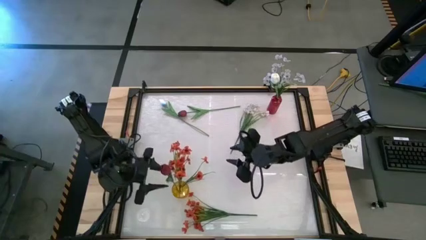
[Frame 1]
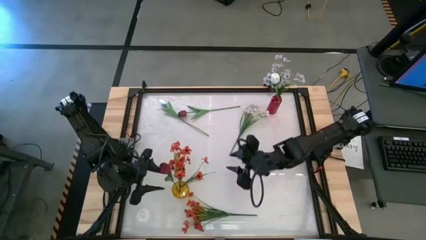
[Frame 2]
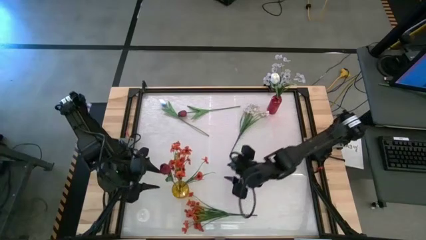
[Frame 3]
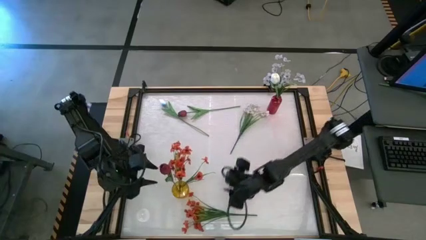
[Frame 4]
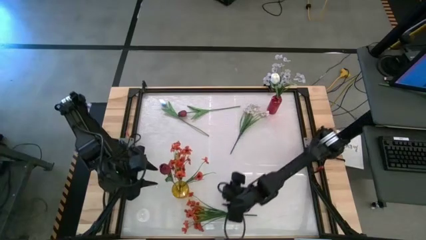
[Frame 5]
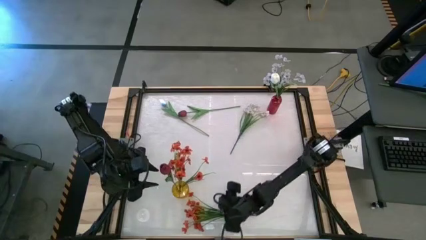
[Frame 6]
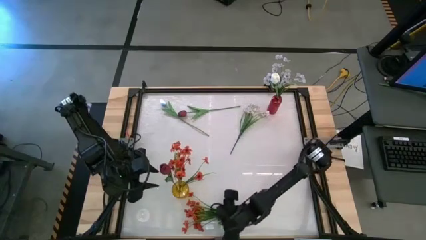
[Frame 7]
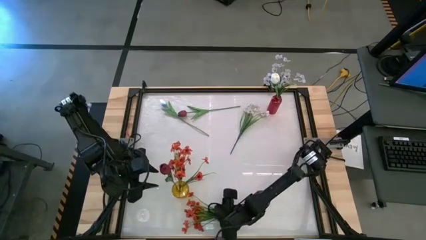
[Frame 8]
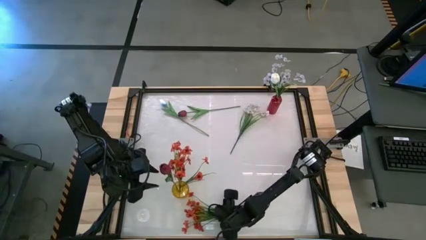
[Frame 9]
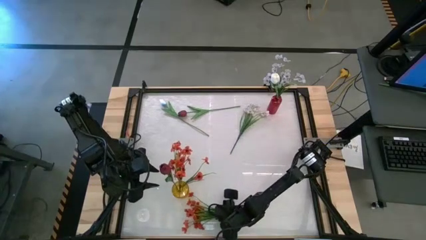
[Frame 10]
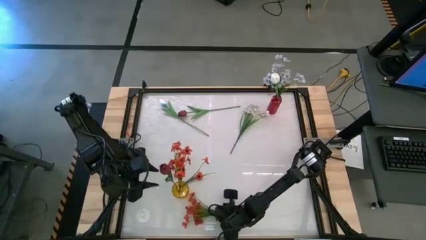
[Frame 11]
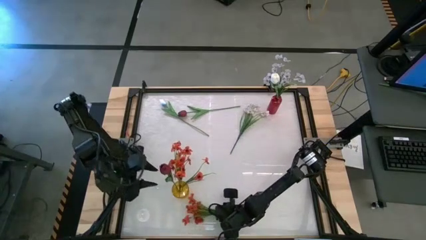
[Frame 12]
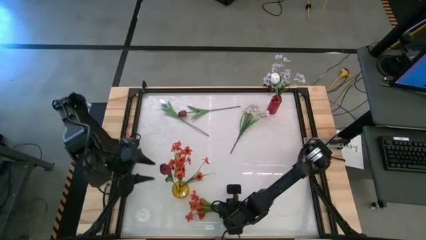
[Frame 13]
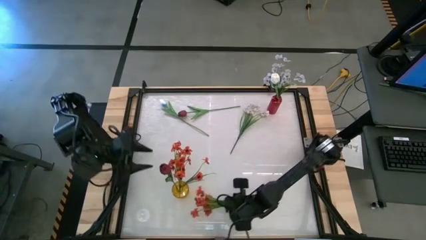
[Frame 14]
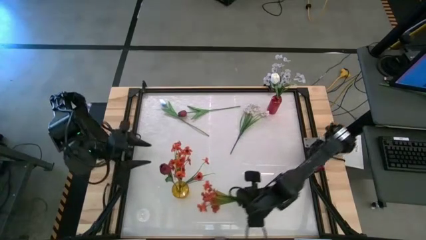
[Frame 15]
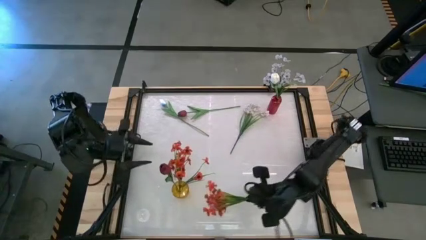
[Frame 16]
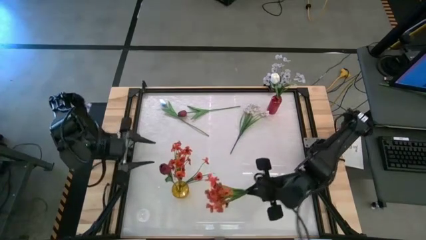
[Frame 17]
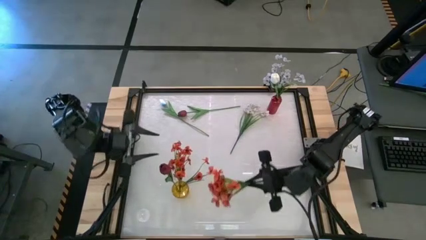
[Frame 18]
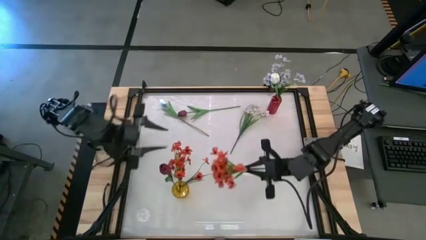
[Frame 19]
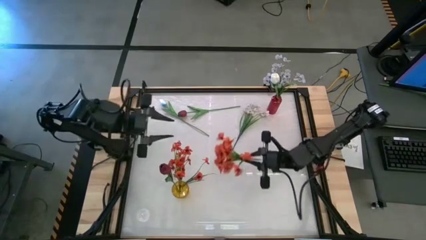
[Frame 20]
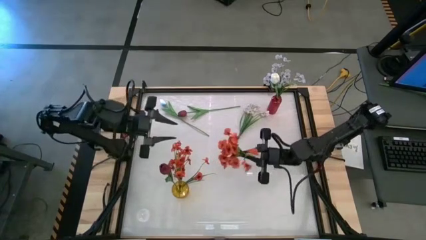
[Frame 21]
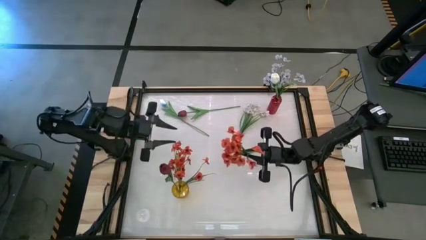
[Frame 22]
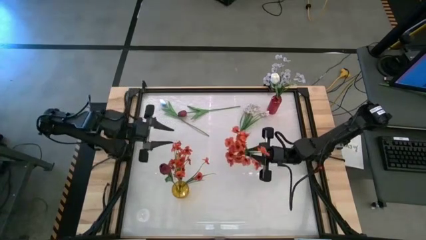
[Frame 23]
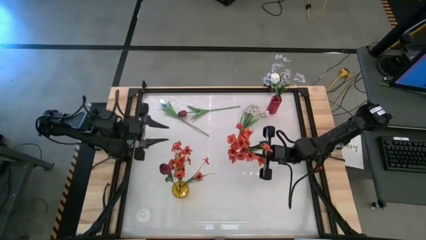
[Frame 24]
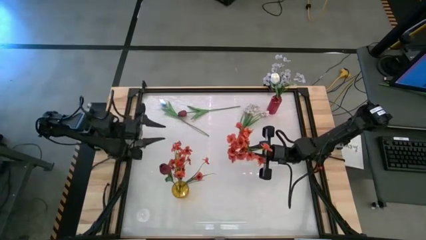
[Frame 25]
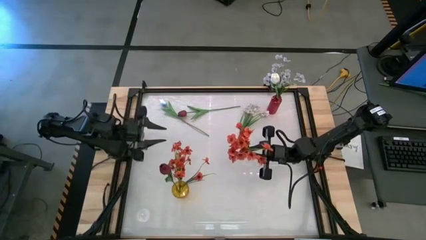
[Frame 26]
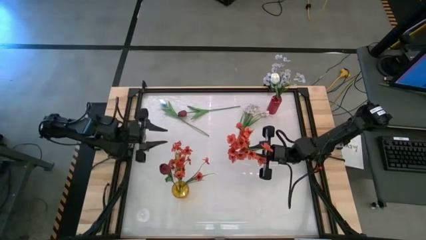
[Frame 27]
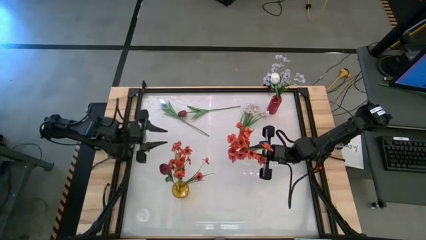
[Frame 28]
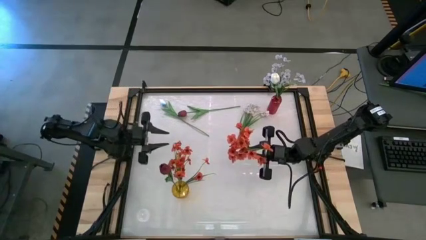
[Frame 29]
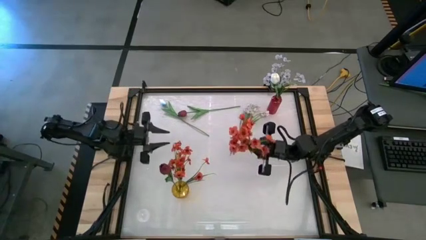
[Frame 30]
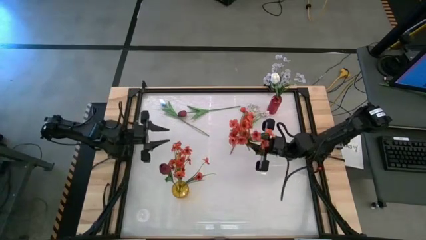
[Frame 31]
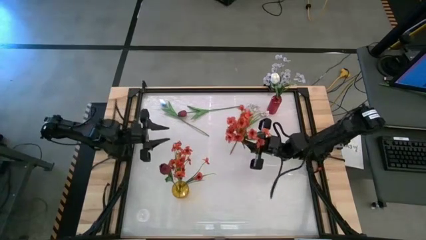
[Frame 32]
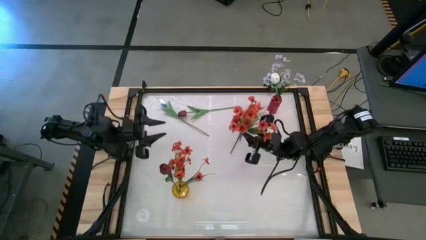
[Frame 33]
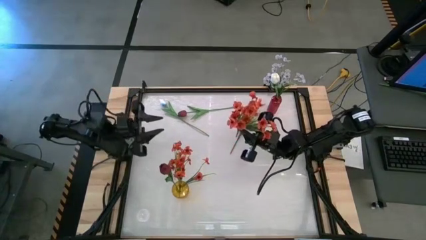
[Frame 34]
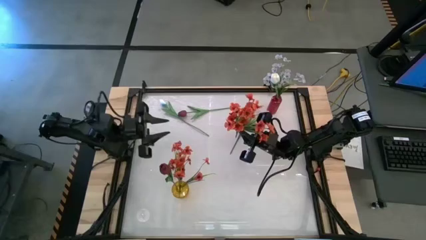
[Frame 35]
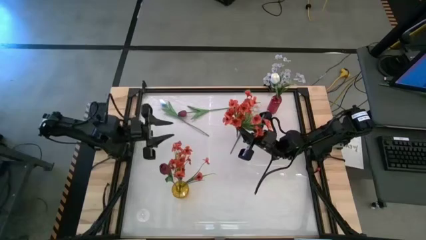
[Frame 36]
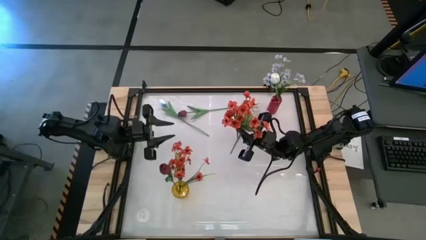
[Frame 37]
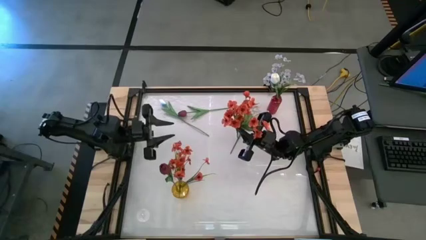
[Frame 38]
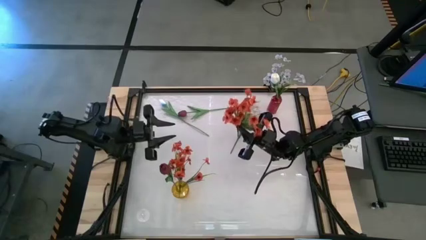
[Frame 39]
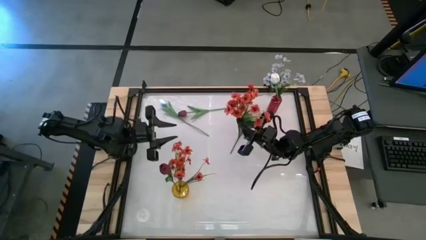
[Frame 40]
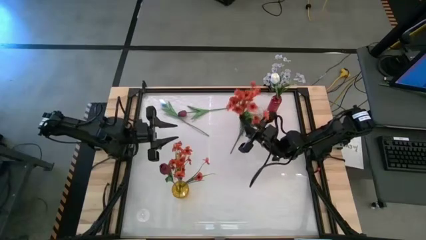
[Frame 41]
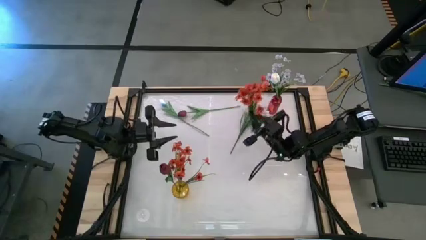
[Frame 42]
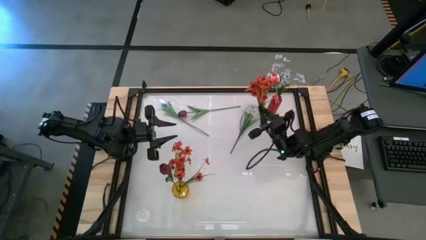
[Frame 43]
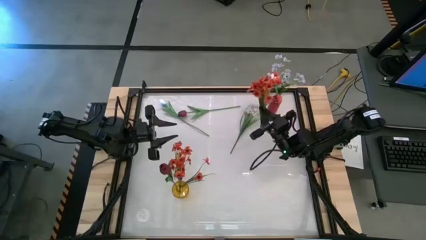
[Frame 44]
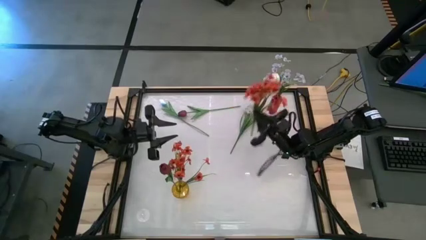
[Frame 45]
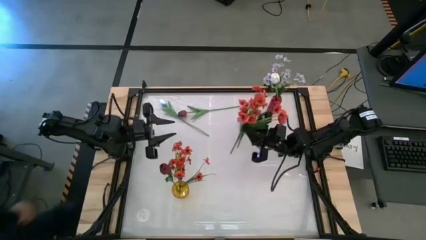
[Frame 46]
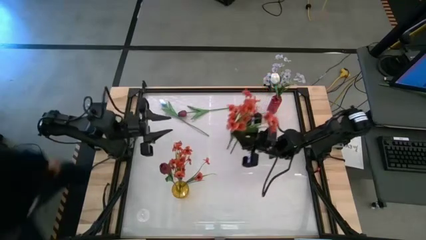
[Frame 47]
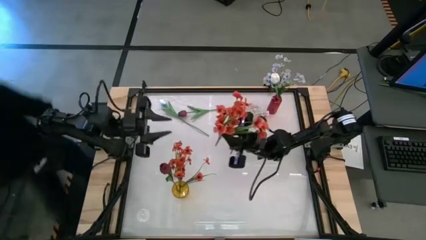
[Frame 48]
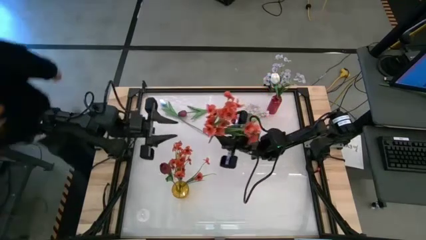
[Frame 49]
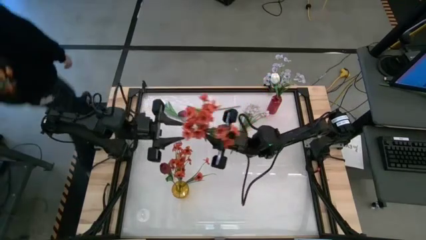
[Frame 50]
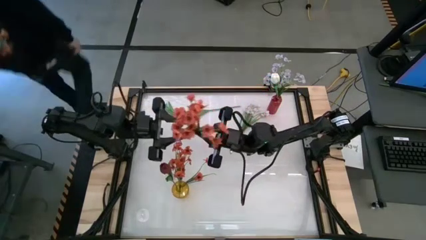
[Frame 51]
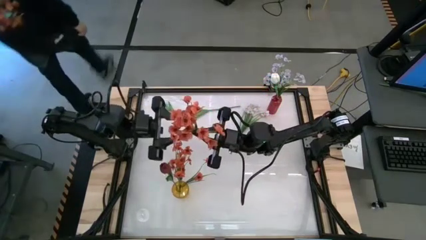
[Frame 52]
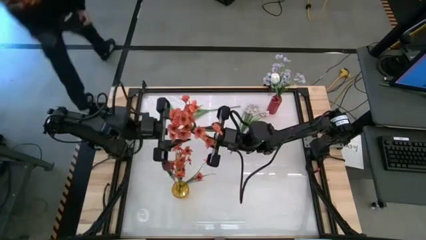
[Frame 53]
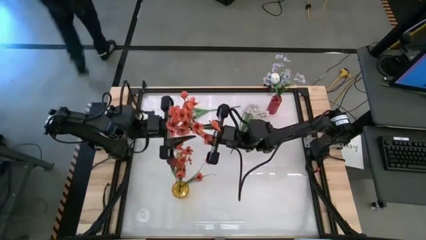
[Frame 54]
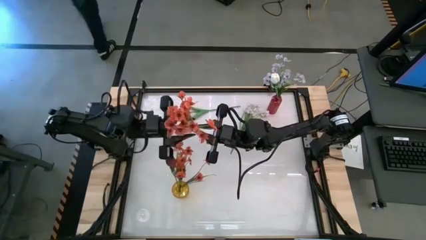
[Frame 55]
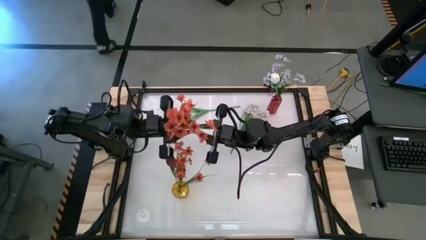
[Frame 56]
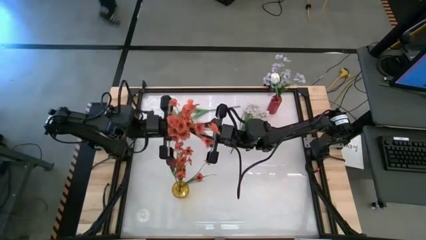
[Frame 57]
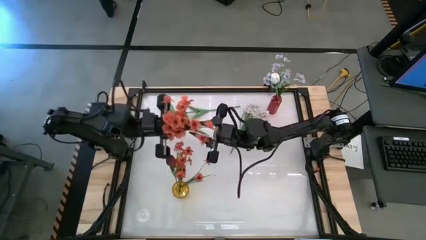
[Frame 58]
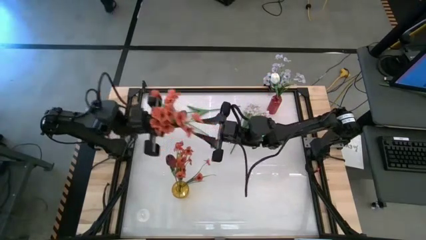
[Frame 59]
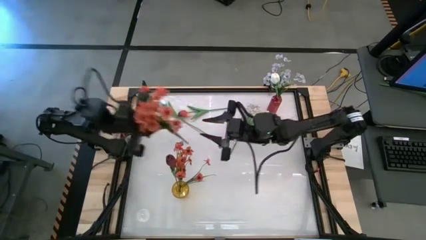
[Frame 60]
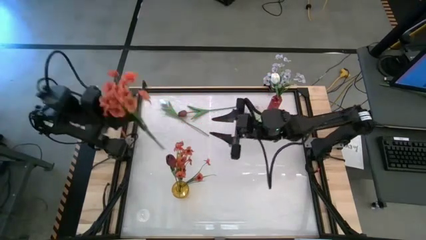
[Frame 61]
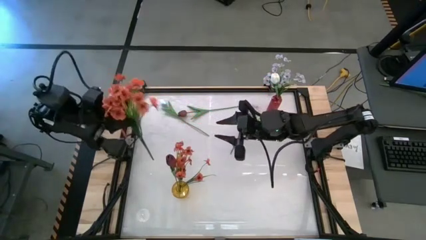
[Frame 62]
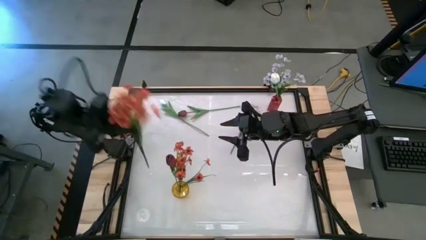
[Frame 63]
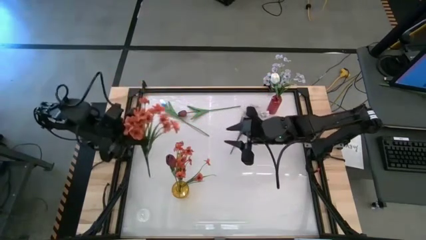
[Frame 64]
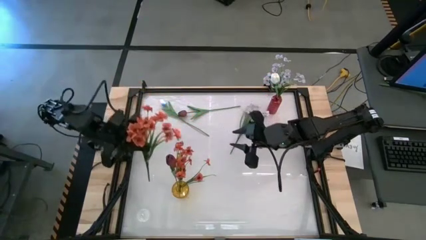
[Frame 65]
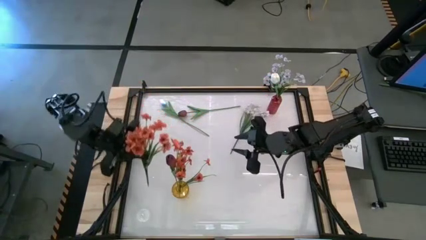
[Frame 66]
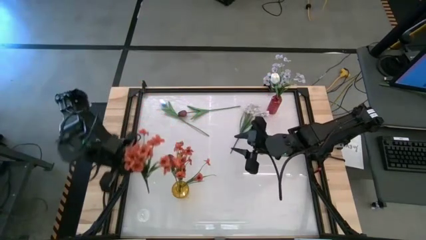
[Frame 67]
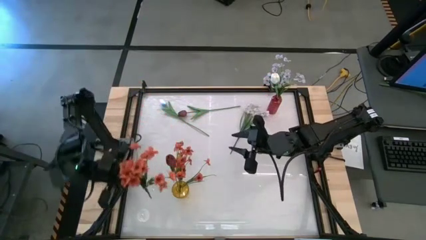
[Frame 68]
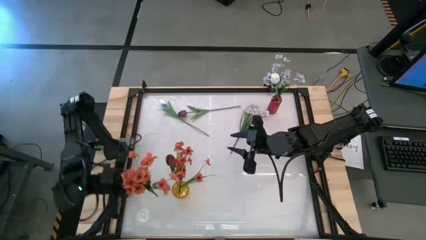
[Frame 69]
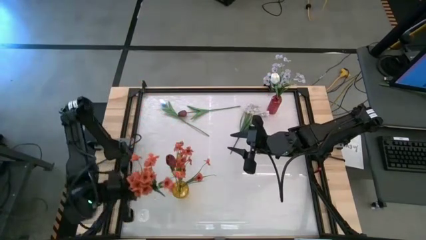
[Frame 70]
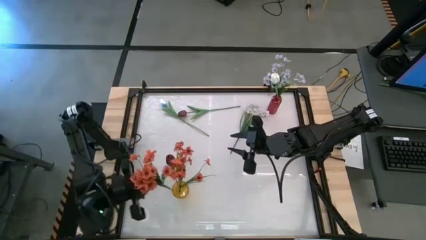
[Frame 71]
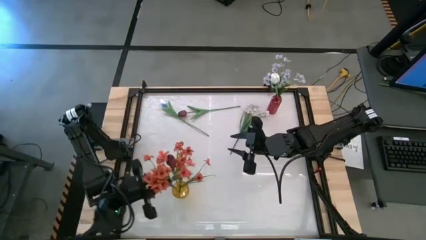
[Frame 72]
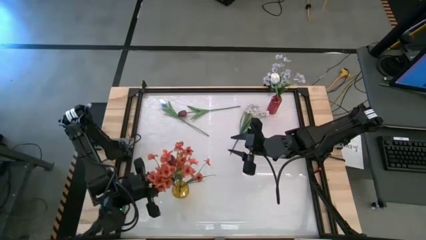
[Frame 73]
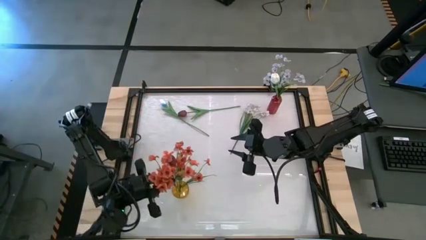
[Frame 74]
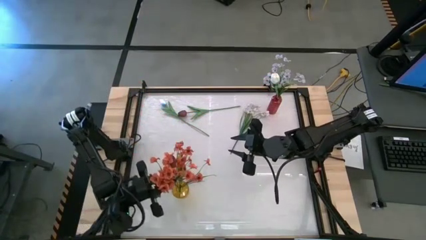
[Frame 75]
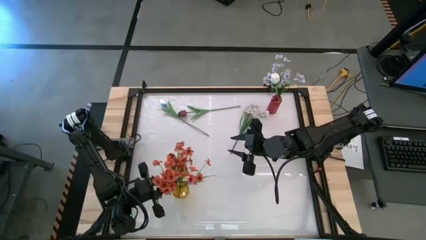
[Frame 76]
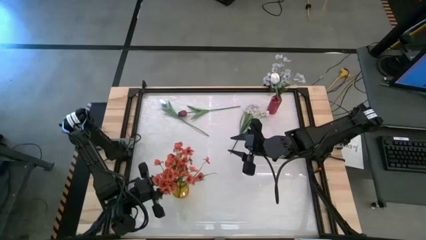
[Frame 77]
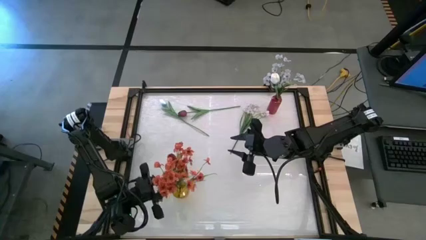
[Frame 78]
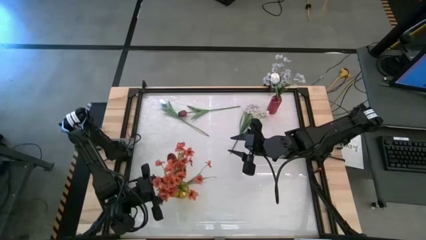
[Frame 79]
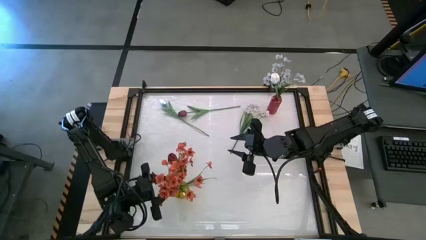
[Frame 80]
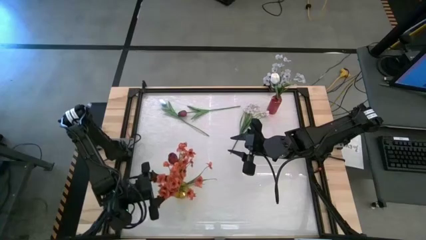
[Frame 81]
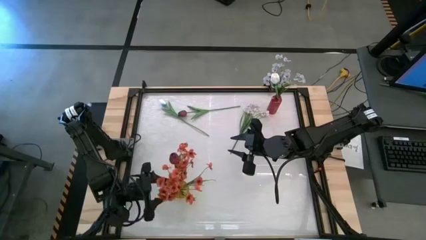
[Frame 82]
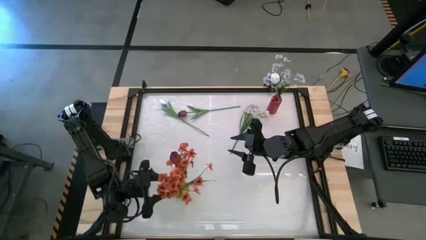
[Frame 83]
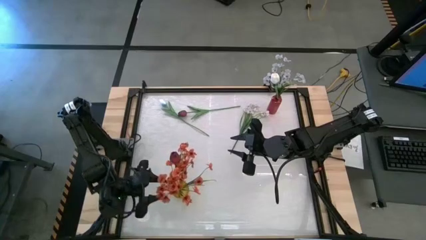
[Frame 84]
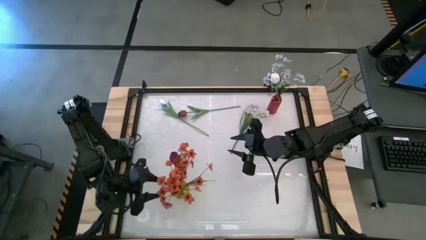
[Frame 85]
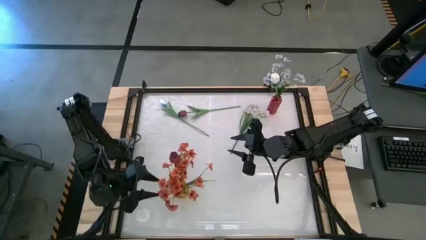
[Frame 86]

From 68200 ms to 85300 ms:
Task: Sort flowers into vase by color
Put the orange flowers into the yellow vase
